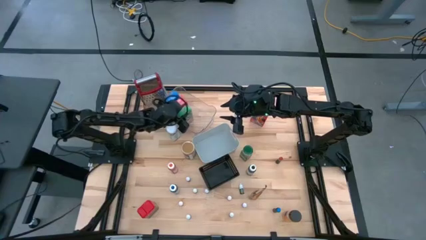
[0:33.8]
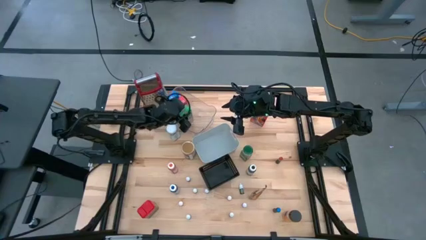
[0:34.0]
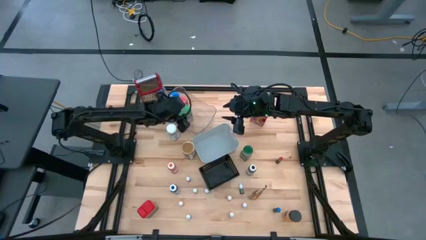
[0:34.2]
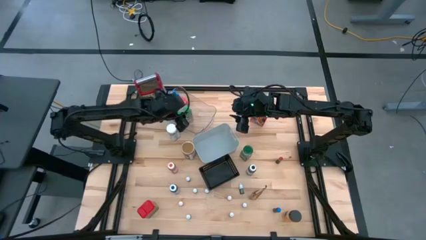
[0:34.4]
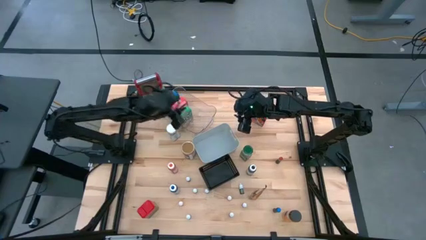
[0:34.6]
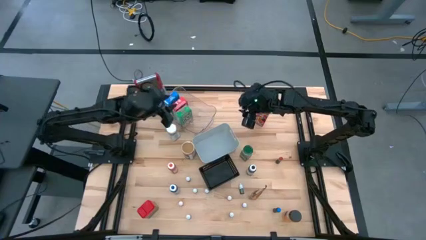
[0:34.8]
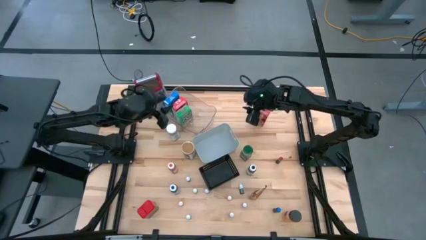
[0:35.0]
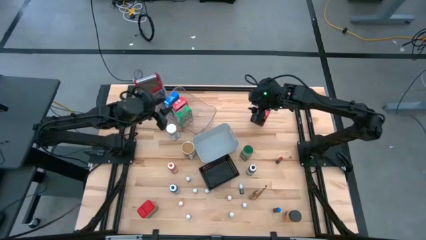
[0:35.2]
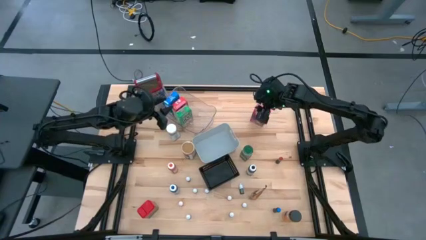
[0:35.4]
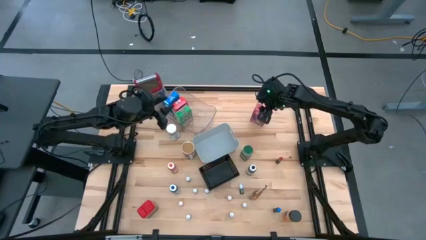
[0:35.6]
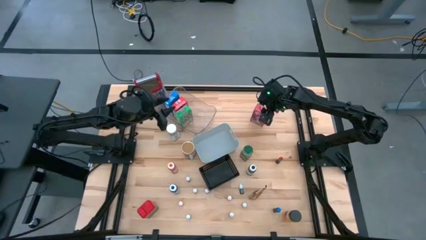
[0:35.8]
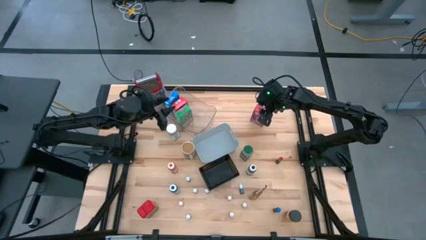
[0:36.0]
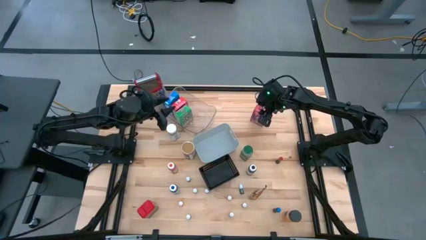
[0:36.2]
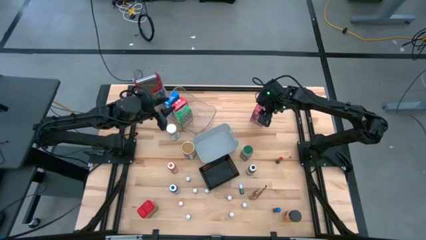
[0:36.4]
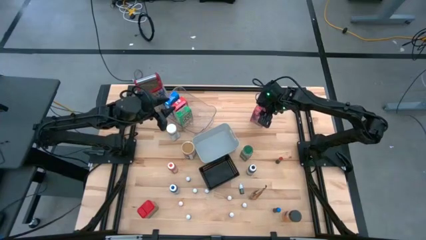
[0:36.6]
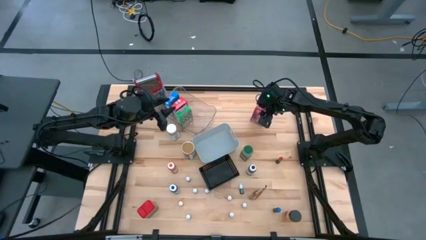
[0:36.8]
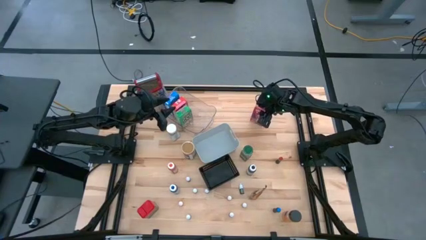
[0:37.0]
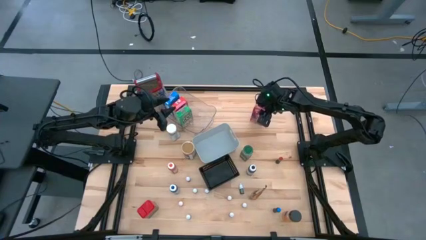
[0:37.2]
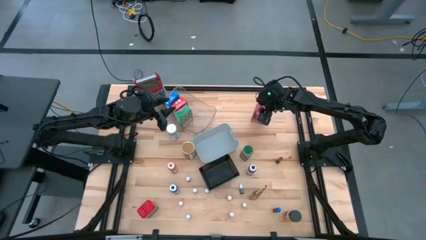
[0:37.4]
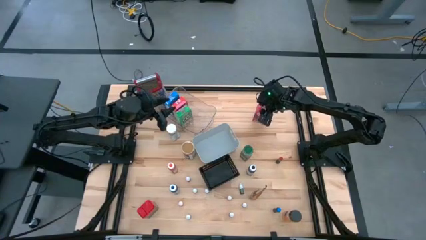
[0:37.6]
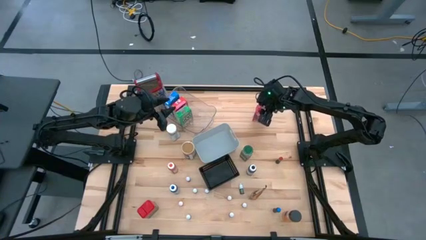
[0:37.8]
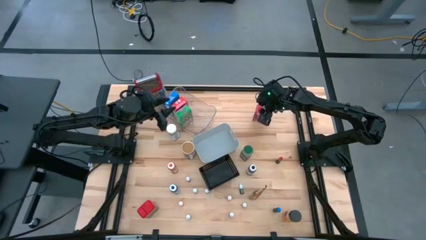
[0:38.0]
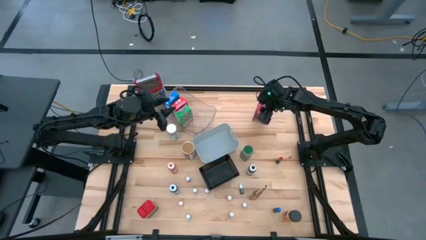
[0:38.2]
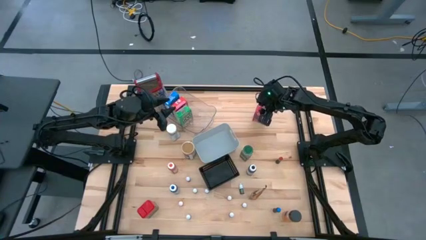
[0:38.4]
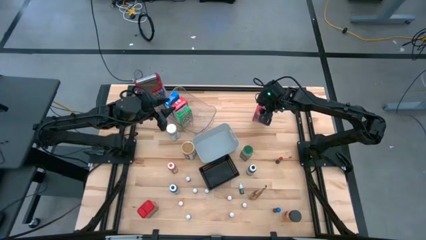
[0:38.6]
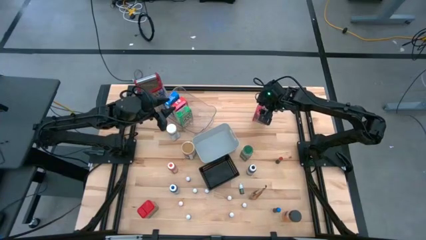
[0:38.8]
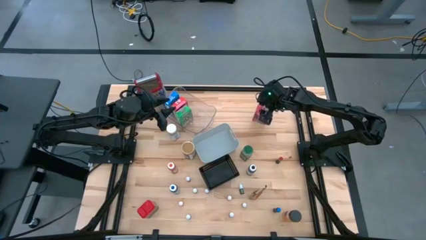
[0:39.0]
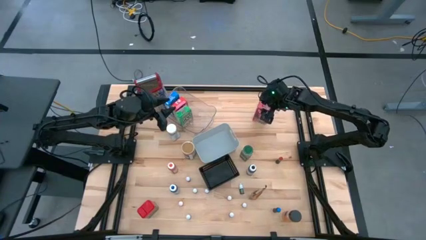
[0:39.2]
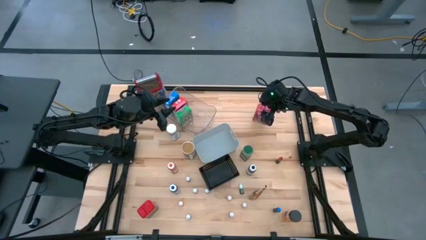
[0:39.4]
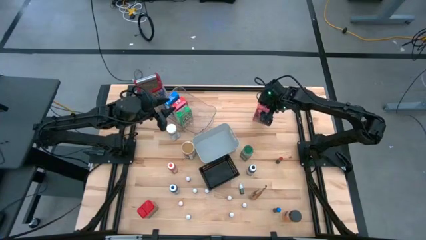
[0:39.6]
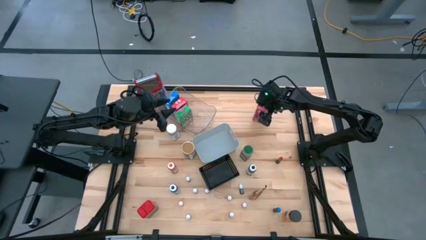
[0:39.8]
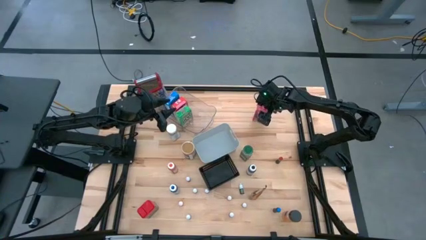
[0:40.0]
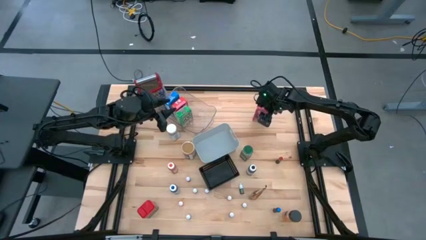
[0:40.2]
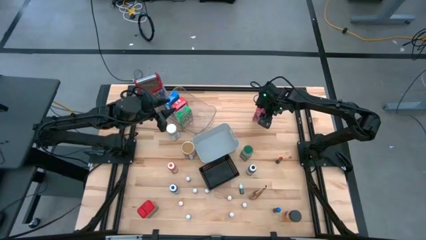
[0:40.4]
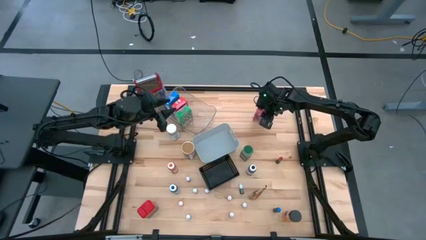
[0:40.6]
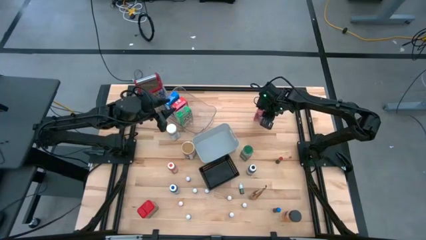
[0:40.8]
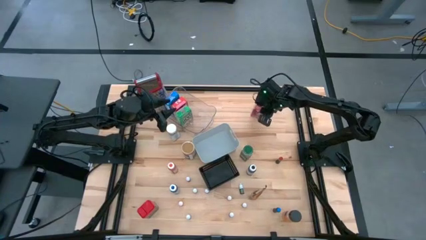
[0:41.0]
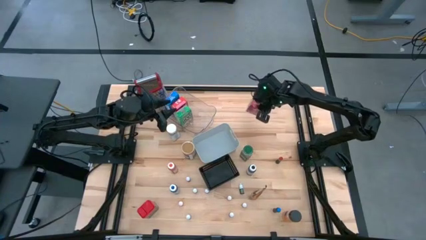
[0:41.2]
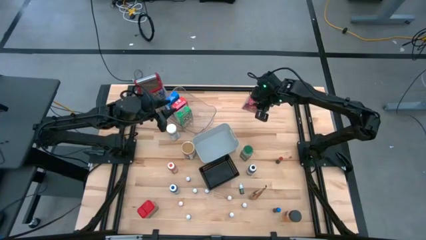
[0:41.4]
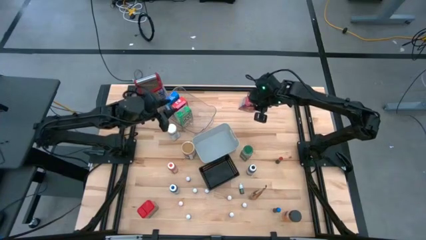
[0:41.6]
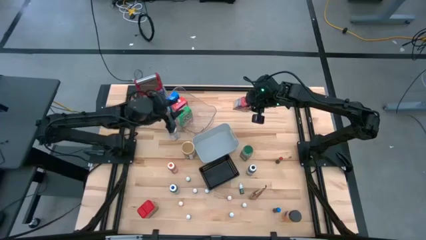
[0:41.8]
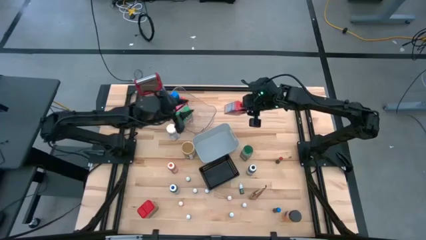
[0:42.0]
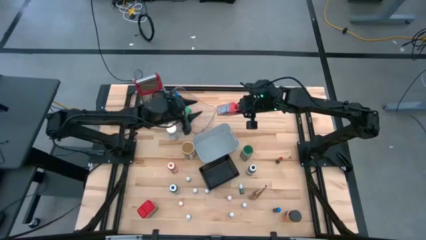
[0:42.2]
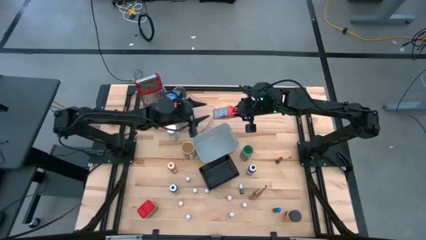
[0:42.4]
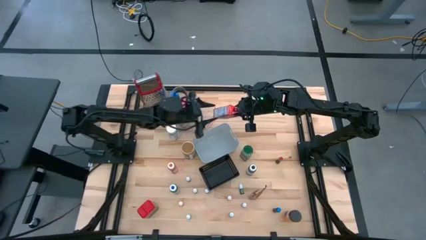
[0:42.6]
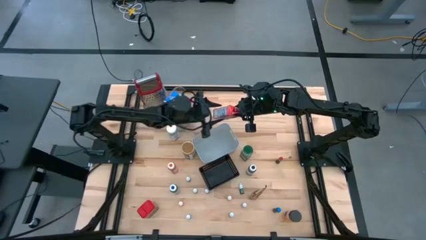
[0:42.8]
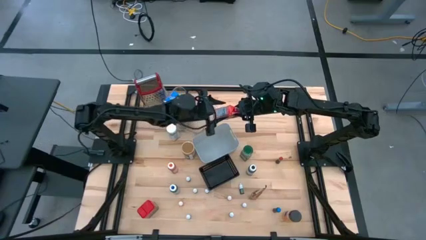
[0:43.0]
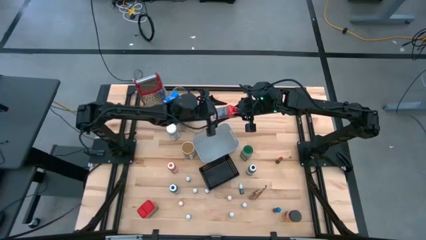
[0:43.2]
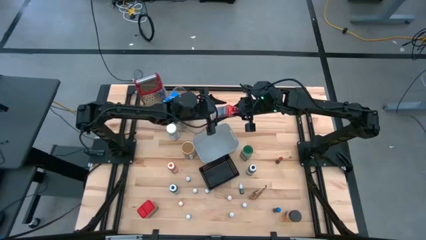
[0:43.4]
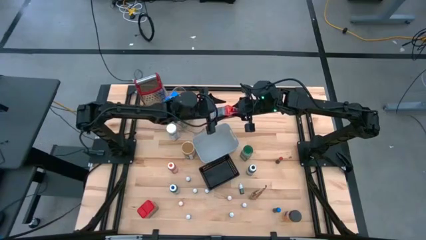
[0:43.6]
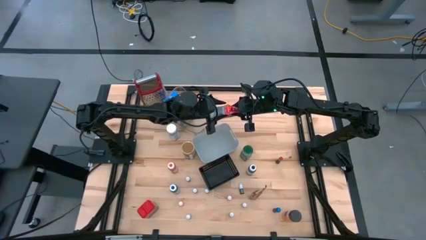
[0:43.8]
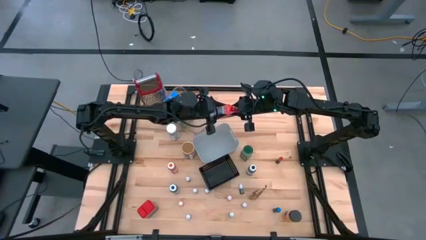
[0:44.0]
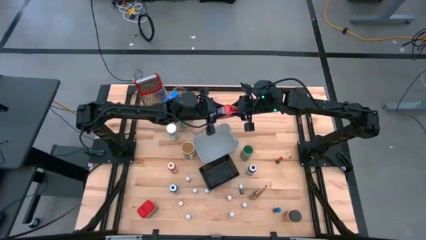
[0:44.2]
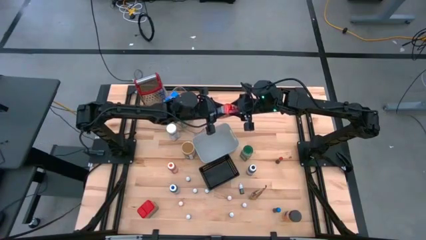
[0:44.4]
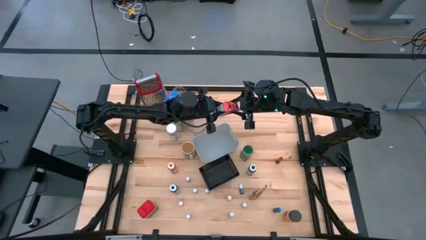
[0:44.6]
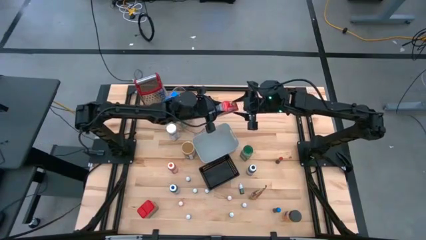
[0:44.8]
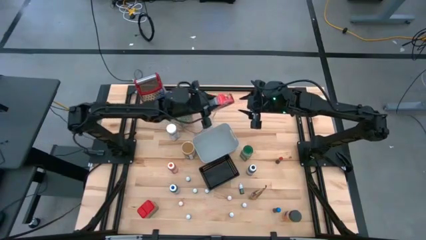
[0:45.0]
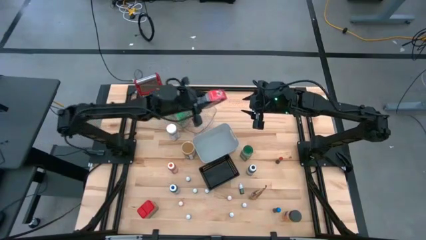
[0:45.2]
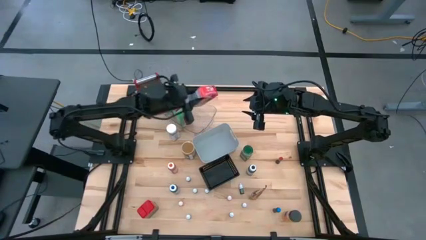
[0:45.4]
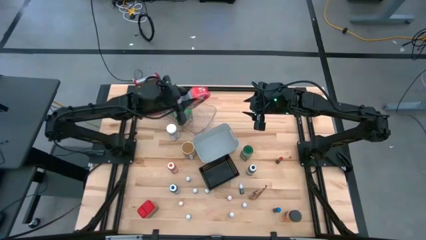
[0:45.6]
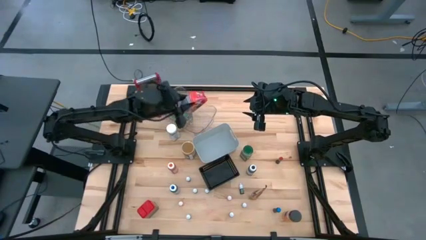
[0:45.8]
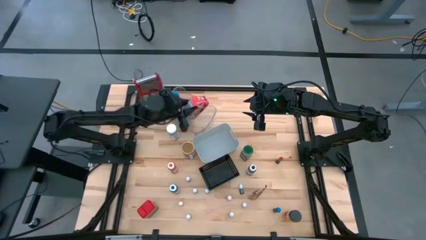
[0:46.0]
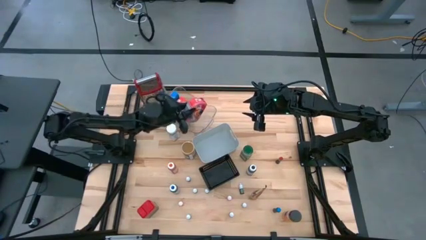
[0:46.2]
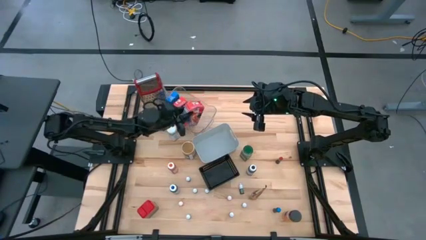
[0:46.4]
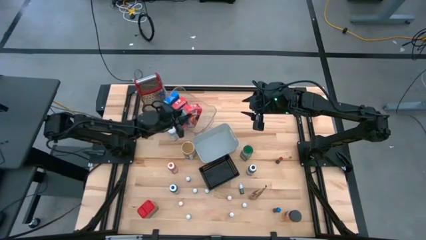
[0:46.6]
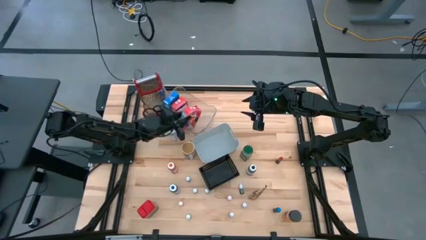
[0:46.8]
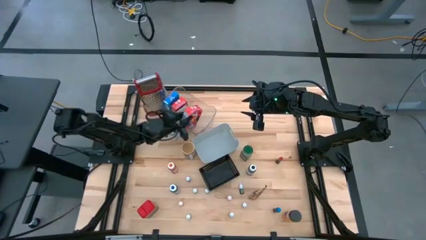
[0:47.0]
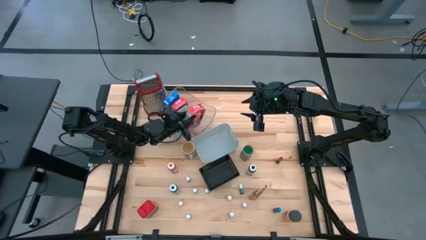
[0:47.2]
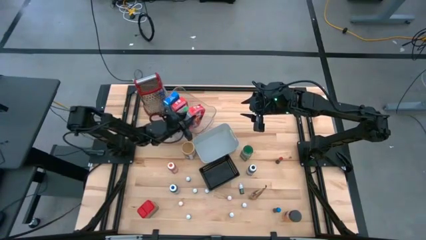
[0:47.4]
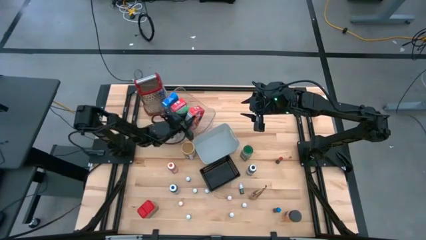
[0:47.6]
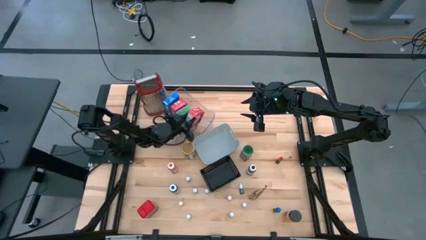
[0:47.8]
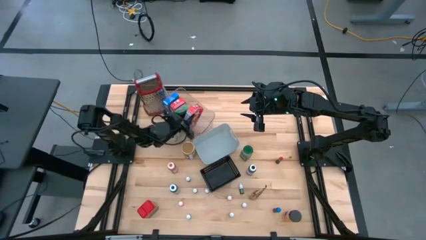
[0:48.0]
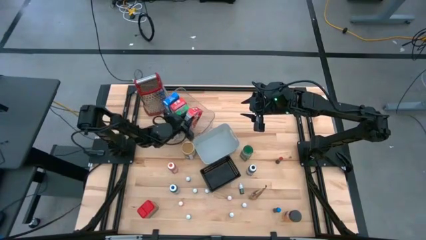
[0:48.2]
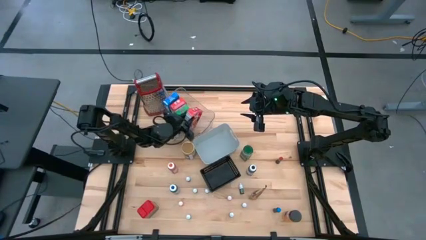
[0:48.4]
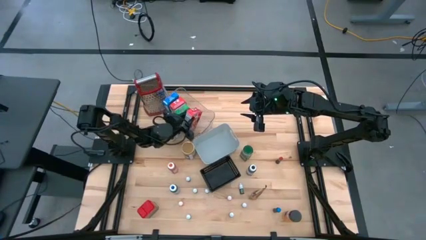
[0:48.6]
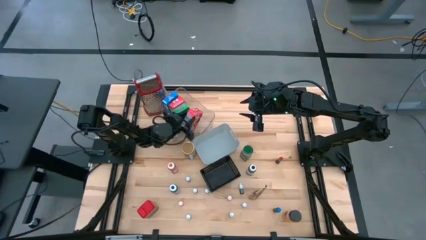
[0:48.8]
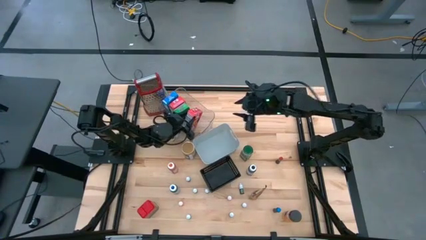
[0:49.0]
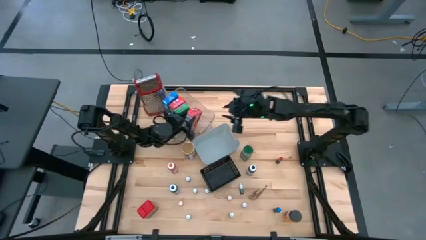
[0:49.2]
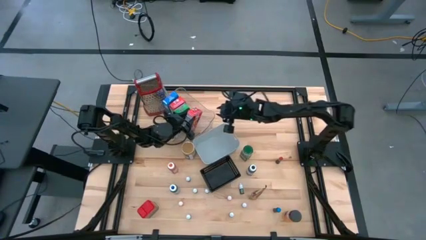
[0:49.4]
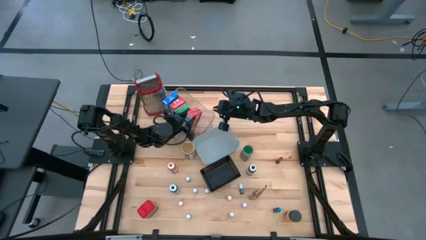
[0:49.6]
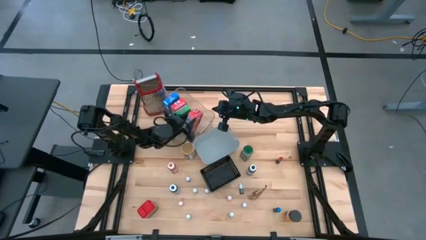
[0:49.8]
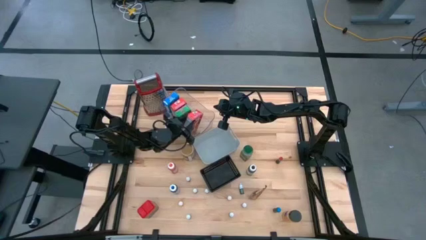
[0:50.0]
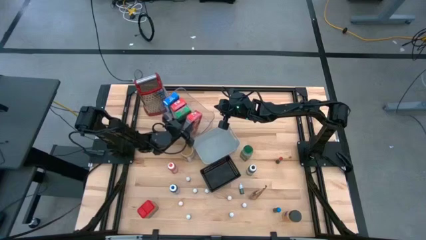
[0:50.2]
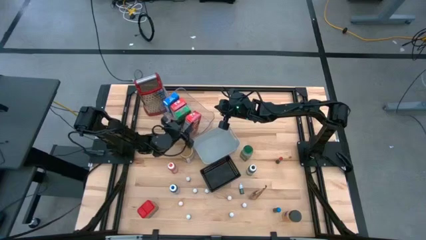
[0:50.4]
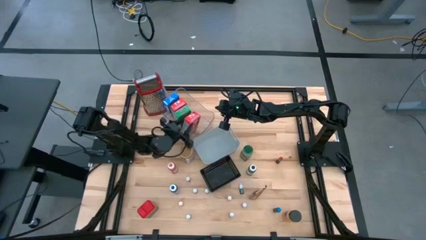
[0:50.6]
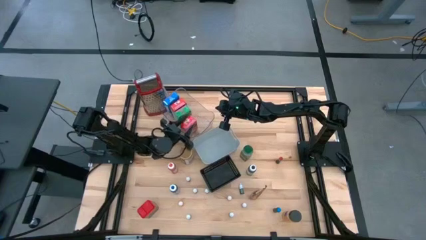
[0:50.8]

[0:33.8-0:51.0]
Task: Pick & Place Kitchen Items
Put the red cereal box into the transparent bin
